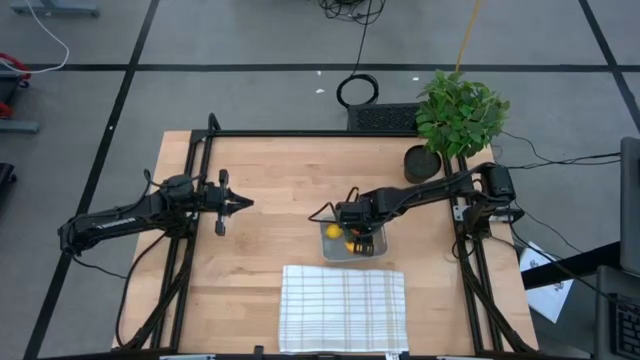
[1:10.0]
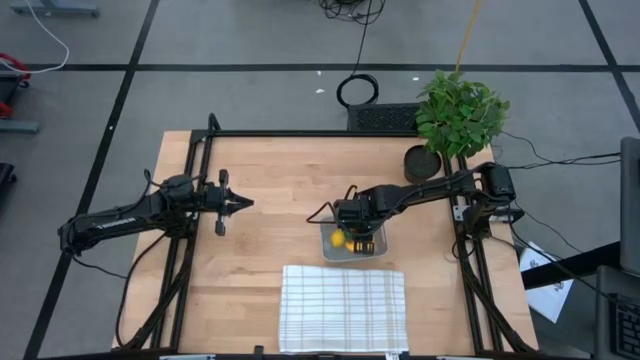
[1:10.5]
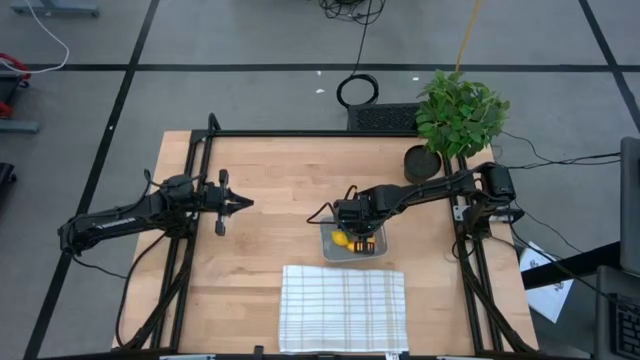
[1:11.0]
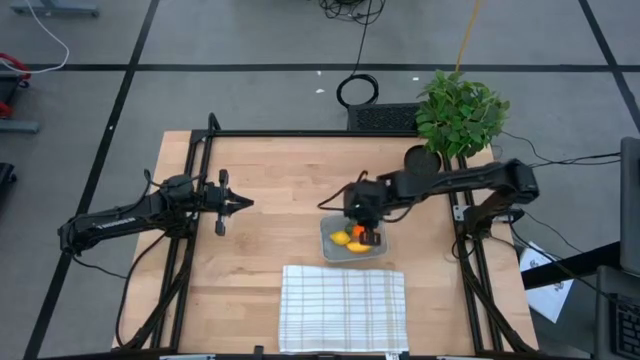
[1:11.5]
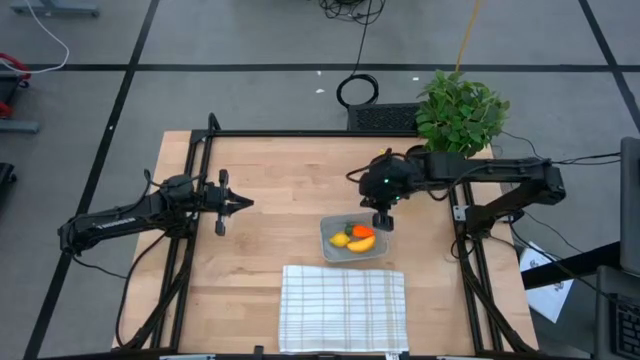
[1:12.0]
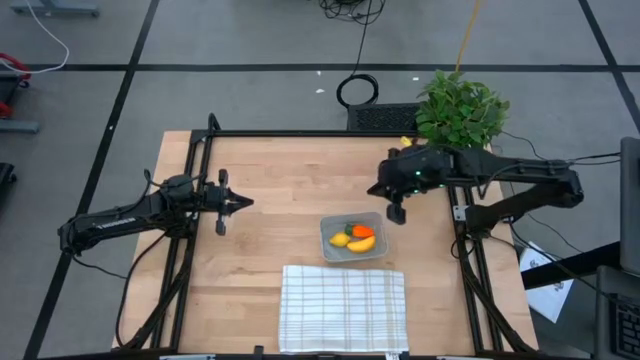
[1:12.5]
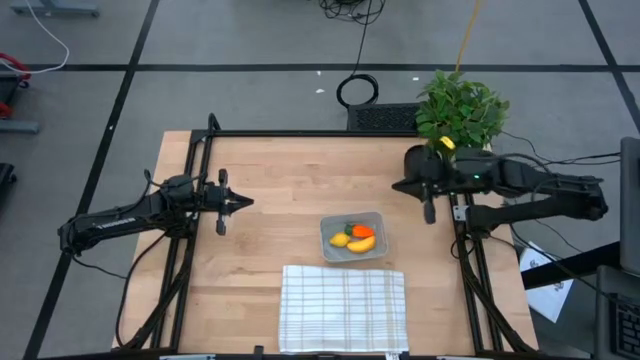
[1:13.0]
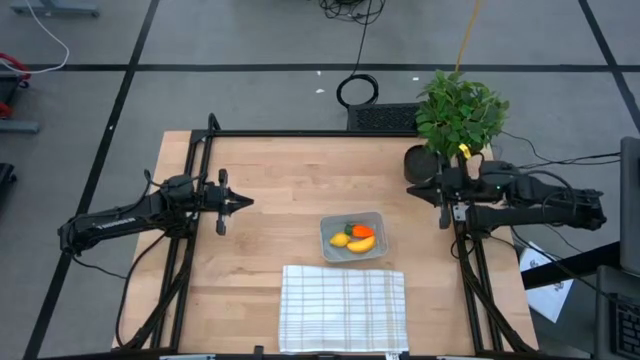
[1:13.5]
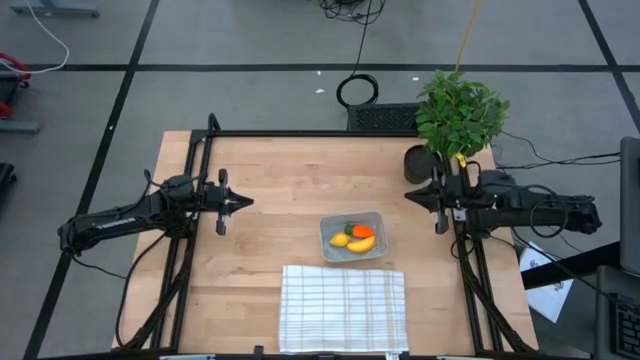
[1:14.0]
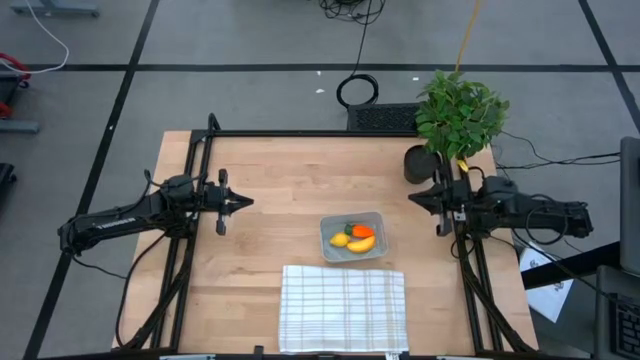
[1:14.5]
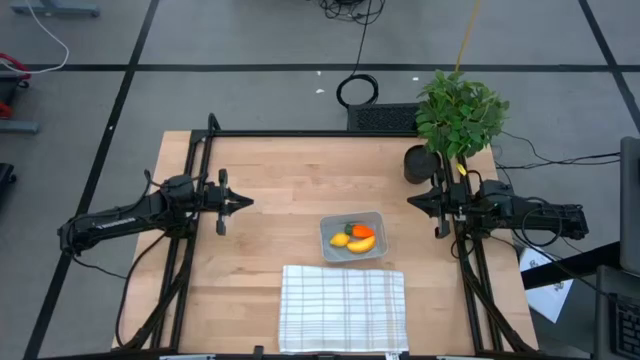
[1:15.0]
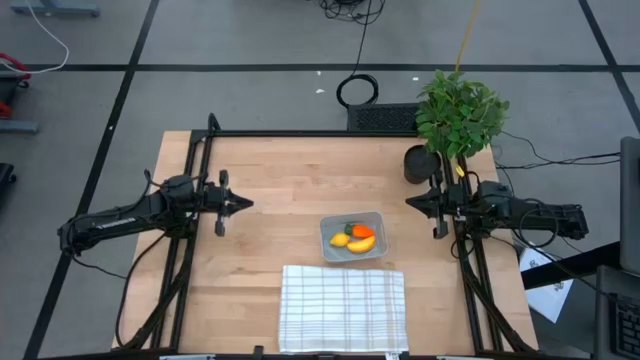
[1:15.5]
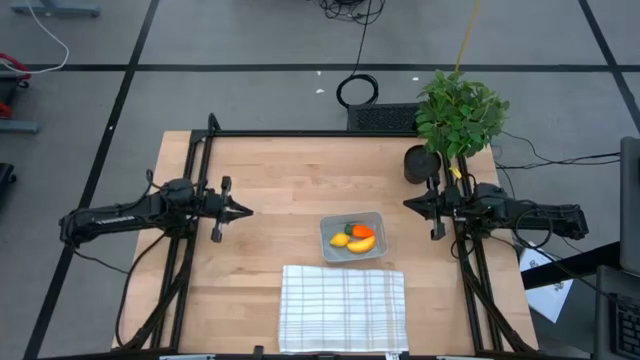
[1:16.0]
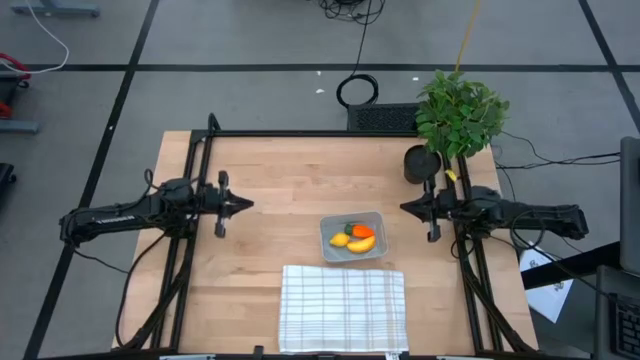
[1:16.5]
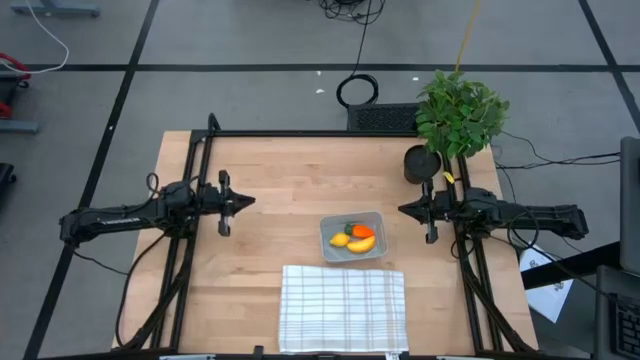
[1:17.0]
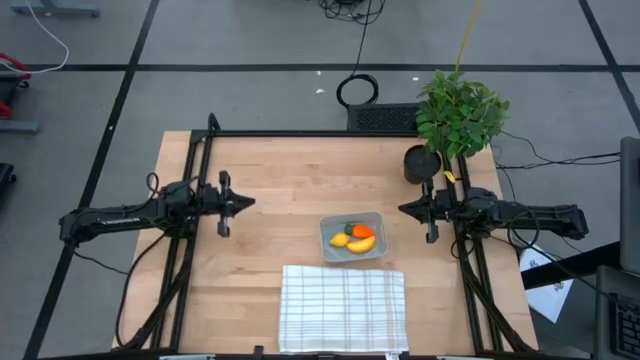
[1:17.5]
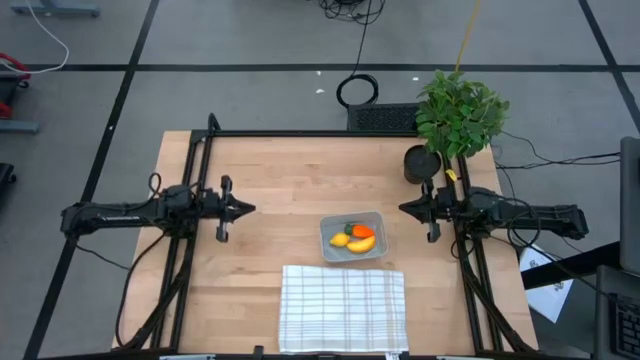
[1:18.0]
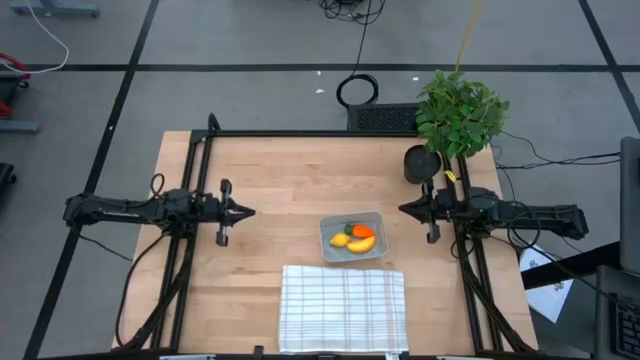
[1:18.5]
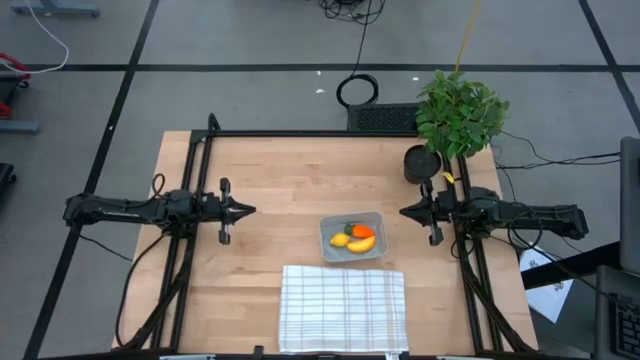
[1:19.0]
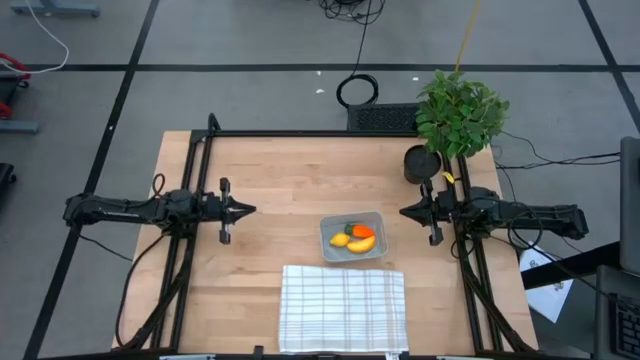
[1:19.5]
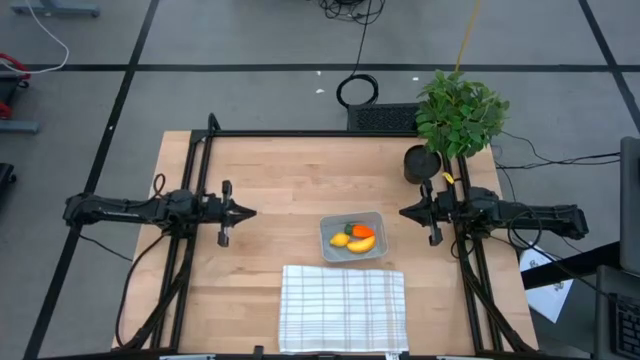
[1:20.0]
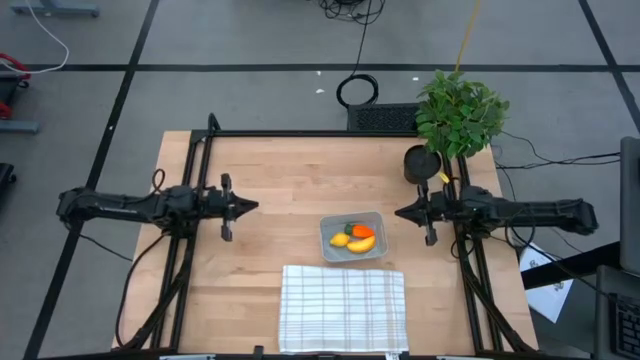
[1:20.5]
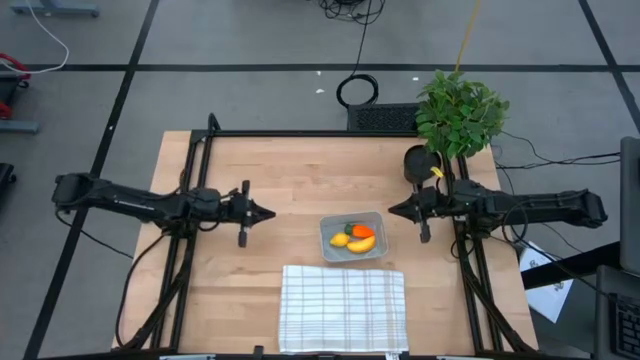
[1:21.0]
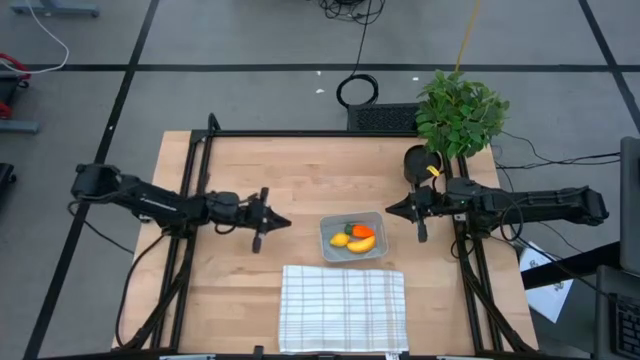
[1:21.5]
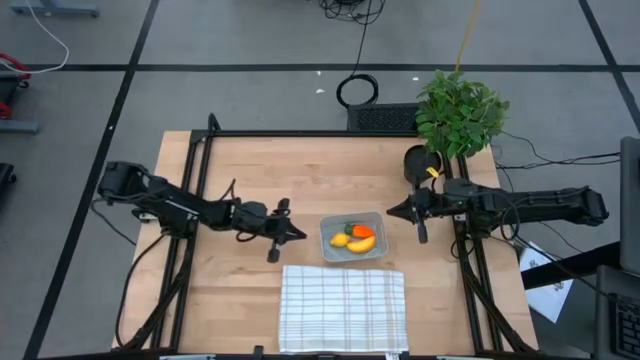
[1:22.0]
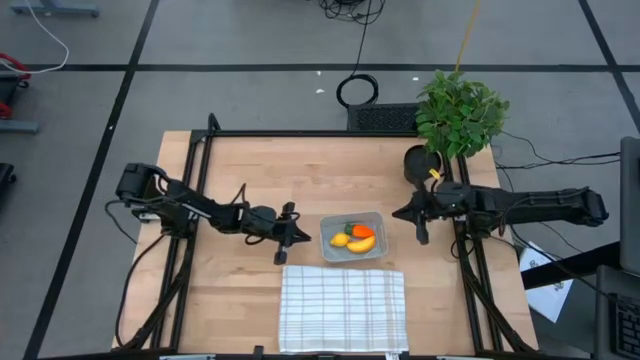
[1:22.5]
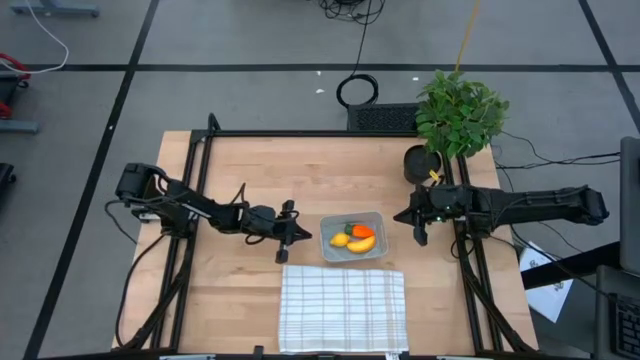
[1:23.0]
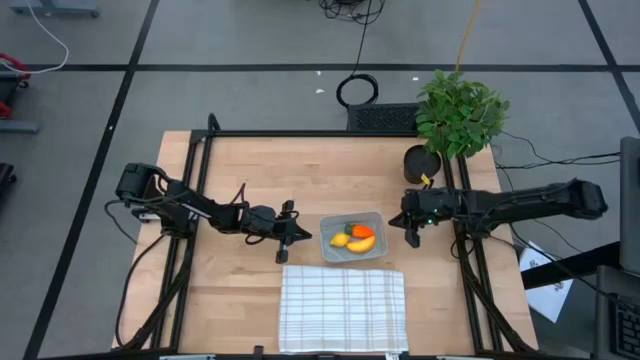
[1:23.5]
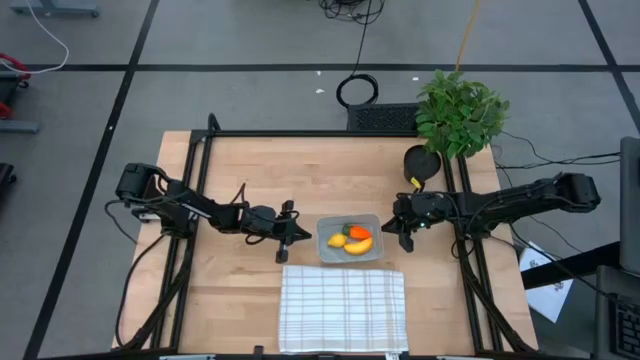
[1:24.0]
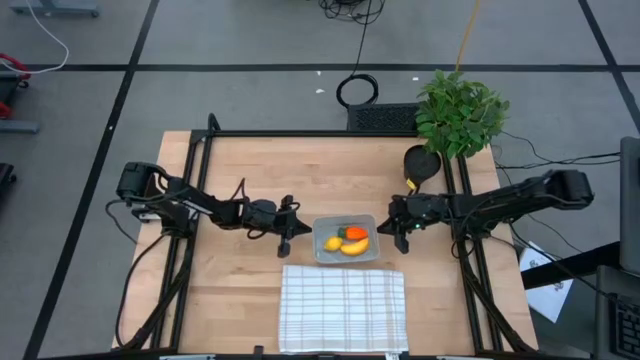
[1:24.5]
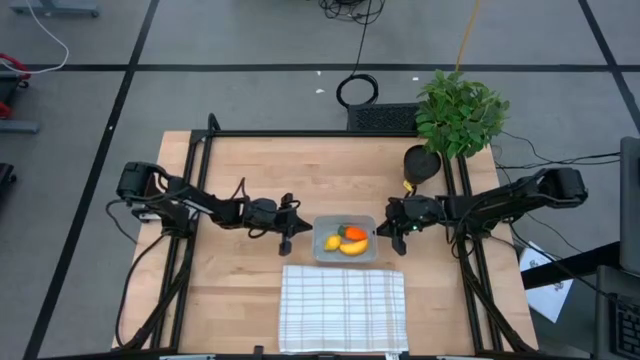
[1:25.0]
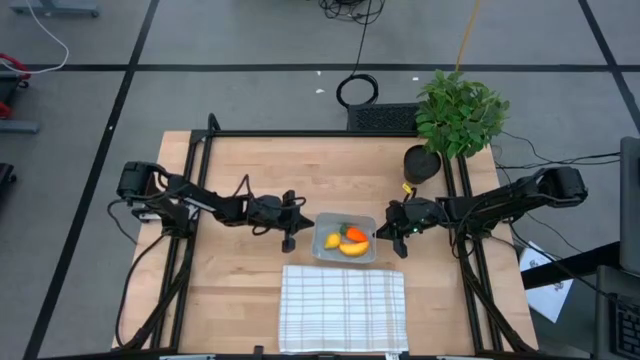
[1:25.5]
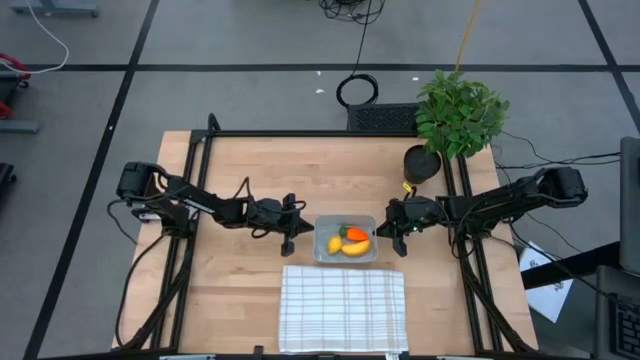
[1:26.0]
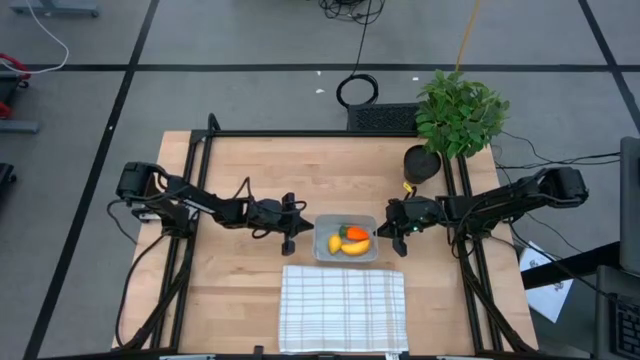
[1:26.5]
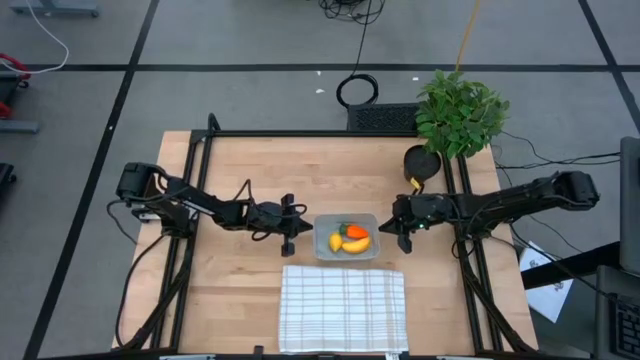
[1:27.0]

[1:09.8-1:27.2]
Task: Pick and placing Produce into tupperware
Adjust the gray bin
